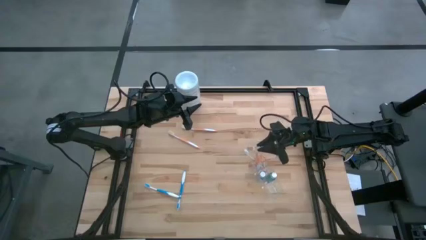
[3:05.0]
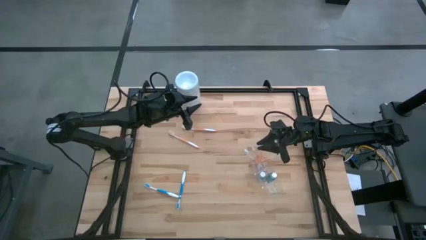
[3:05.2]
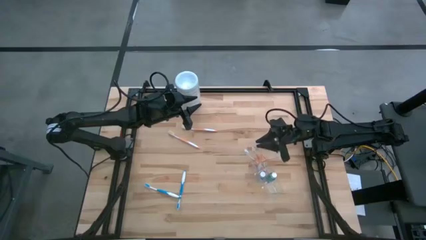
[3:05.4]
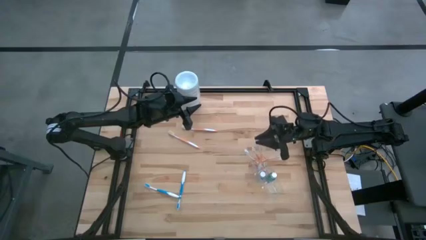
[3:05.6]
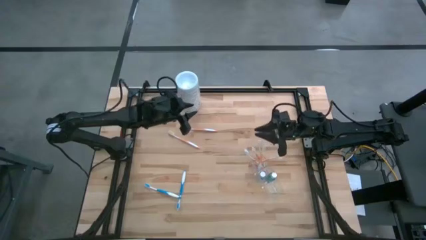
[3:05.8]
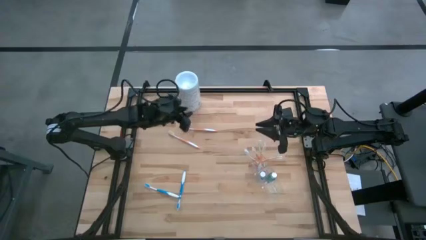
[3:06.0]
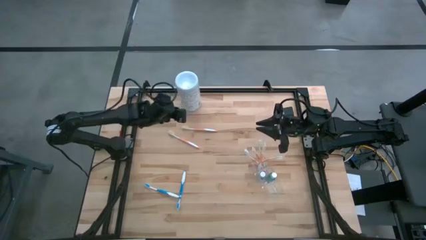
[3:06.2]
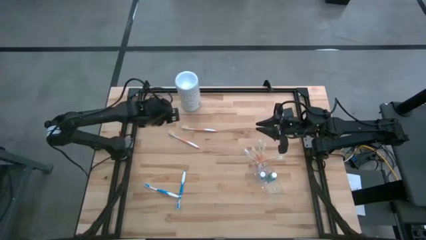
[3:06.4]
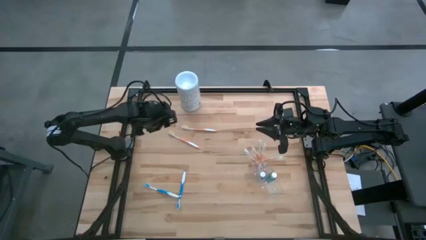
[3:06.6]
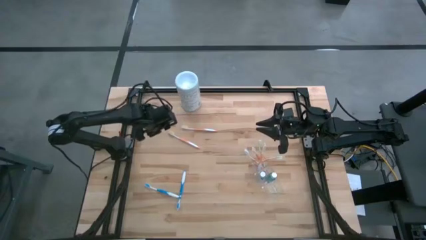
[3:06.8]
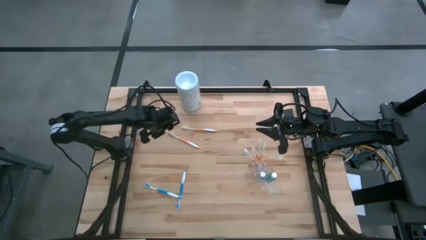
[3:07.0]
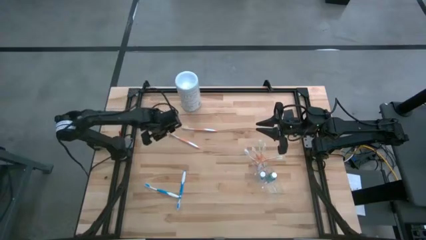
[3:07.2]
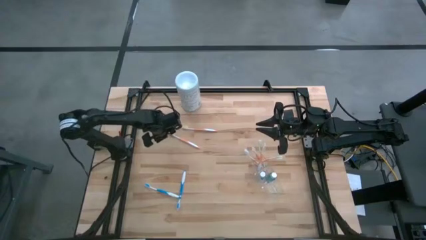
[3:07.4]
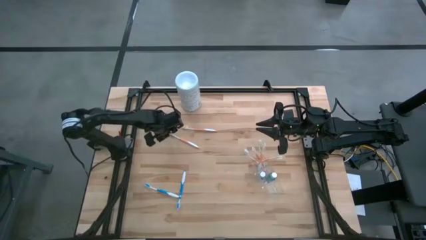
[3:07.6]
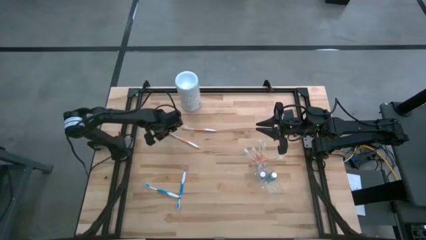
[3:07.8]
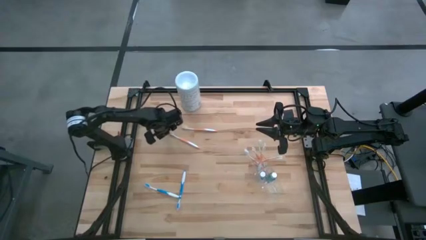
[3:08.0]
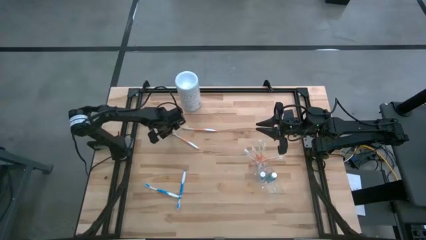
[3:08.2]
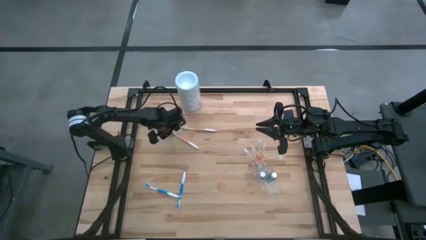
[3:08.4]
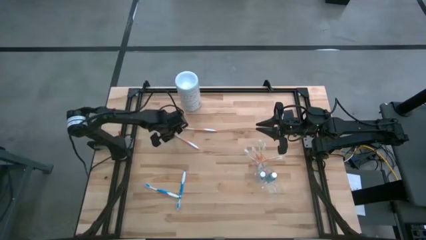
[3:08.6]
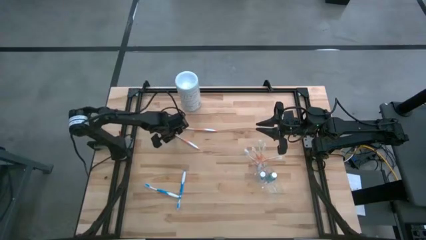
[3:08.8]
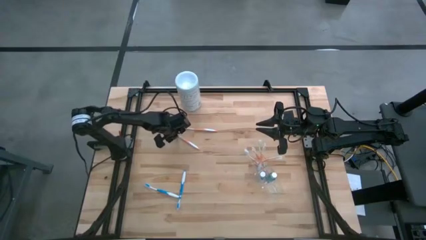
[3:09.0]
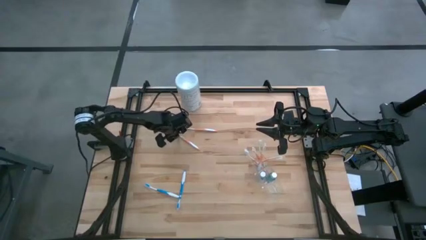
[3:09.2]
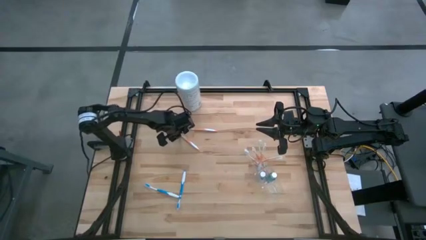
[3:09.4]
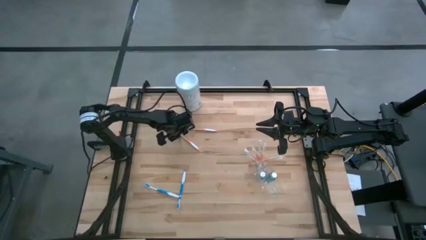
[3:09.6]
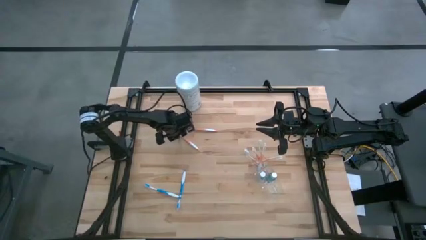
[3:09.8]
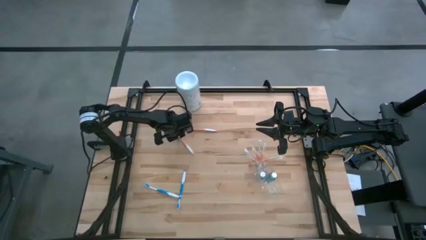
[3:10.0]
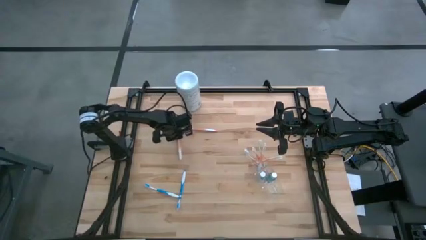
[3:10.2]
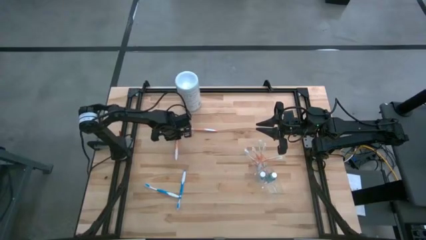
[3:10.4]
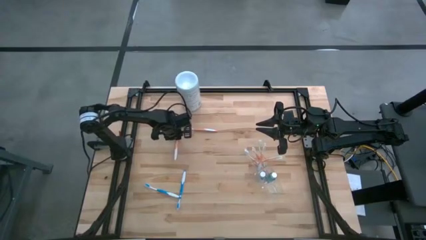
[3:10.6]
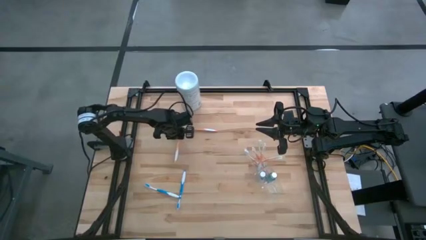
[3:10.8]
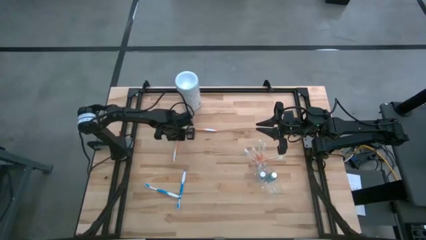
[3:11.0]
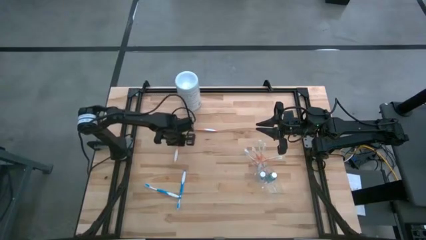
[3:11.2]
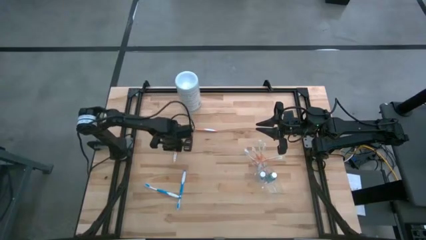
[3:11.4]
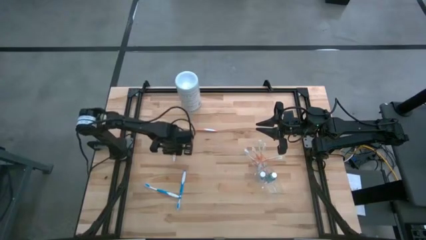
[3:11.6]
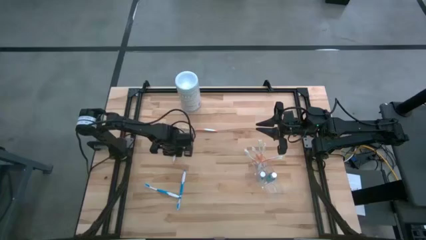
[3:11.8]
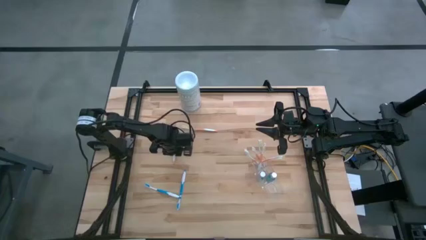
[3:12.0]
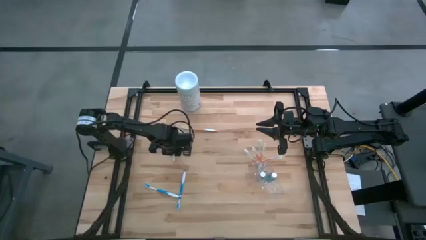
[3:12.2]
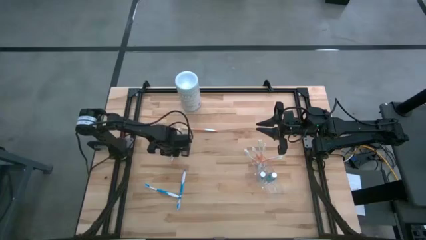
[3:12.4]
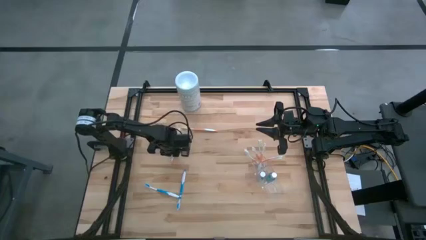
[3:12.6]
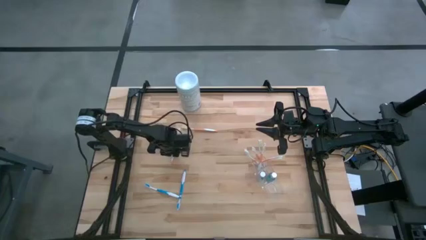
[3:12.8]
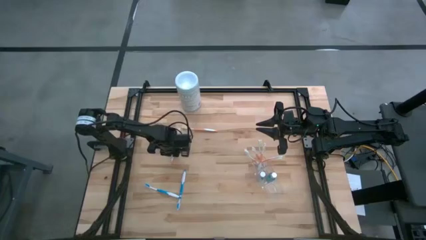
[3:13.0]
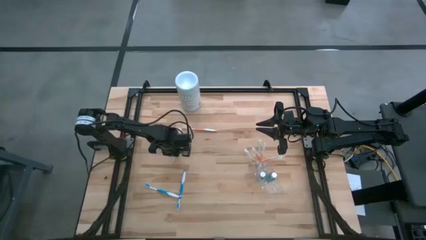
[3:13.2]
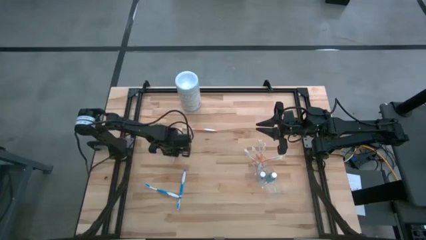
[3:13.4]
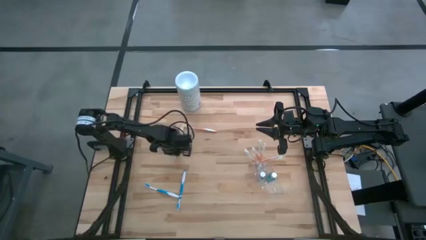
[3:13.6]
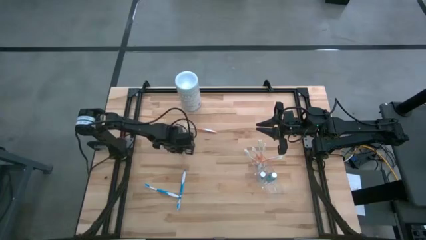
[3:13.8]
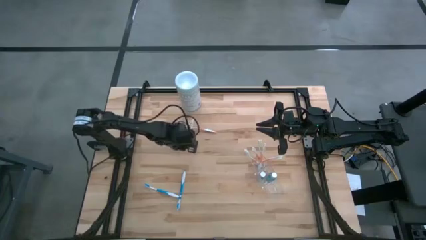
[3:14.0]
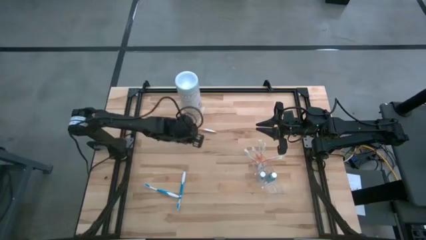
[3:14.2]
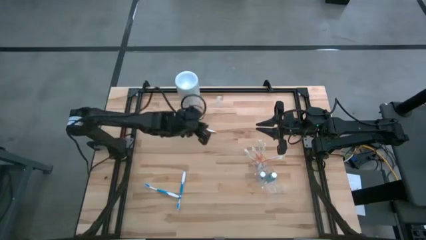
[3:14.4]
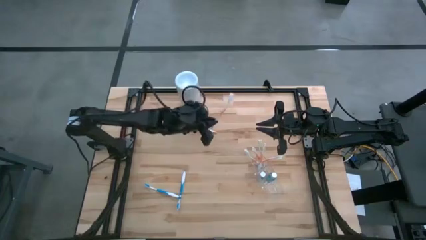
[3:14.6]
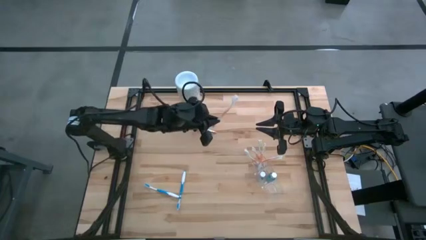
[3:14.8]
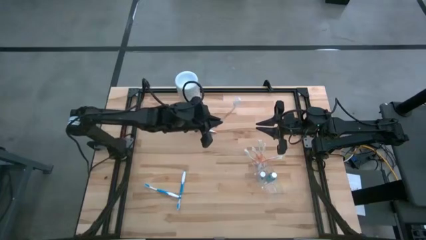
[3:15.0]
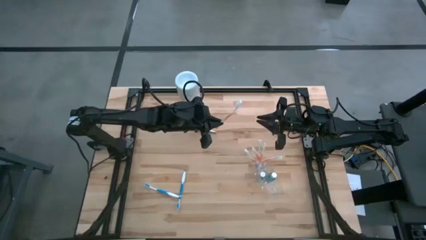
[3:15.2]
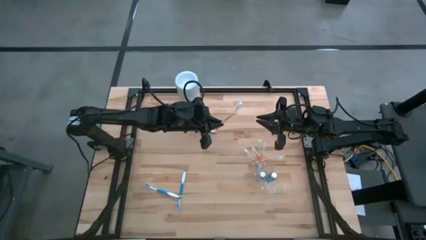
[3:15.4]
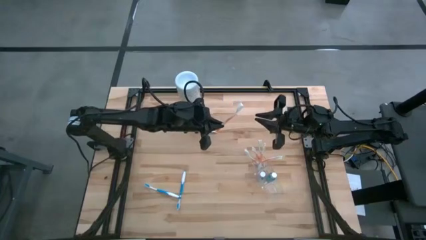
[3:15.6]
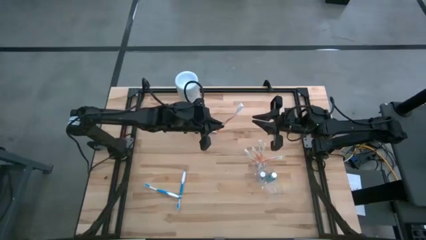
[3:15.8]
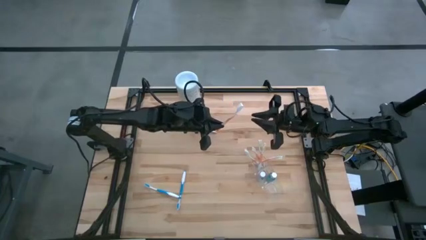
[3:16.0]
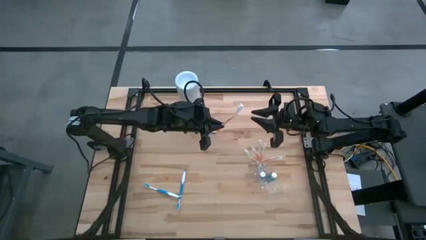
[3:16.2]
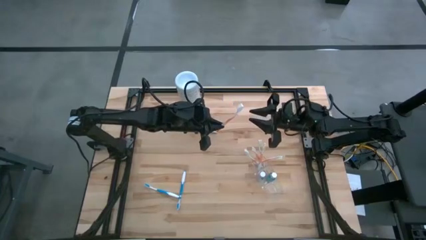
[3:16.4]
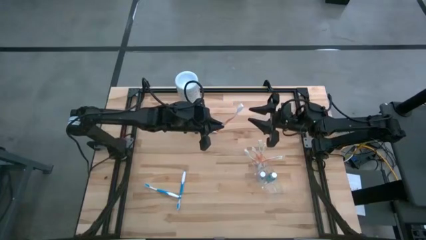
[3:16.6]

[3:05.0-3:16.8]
Task: Pick & Place toothbrushing station
Put the orange toothbrush into the top section of the transparent organizer

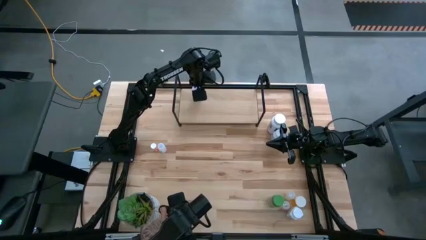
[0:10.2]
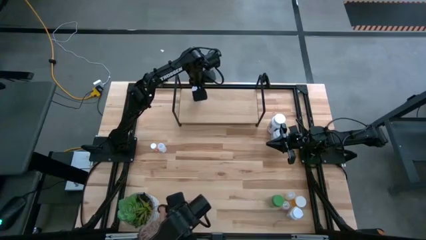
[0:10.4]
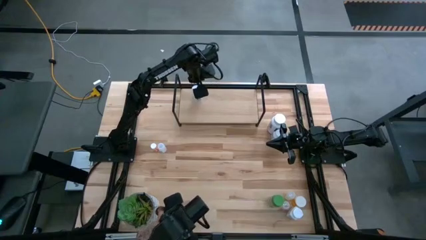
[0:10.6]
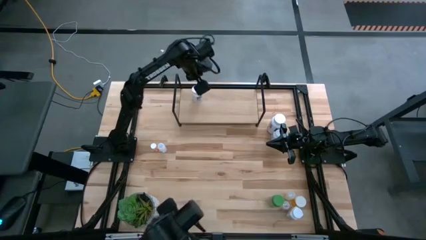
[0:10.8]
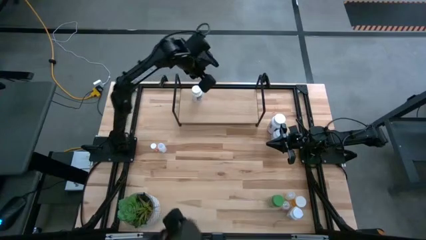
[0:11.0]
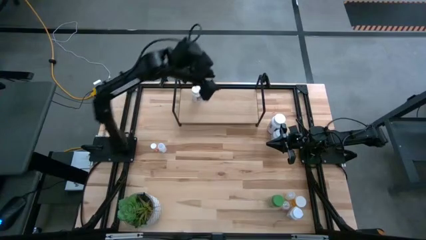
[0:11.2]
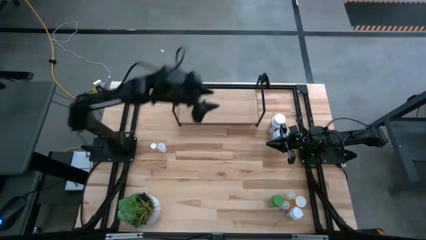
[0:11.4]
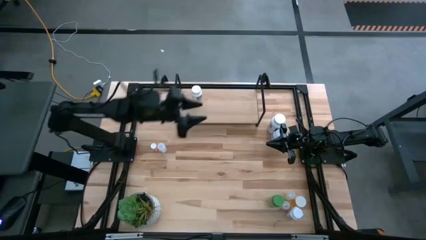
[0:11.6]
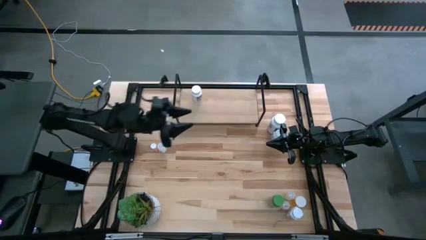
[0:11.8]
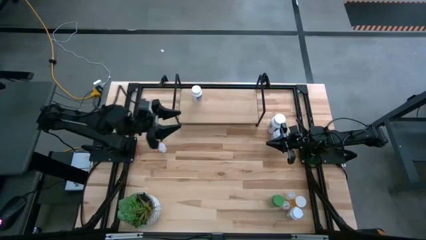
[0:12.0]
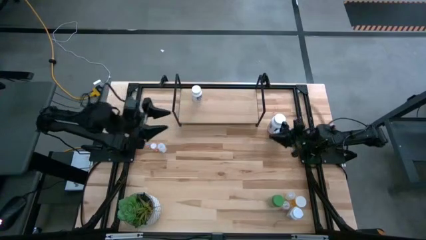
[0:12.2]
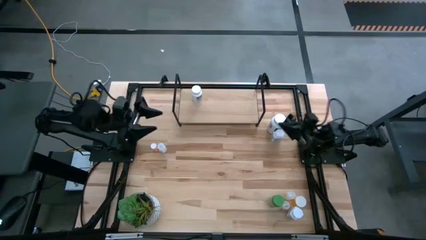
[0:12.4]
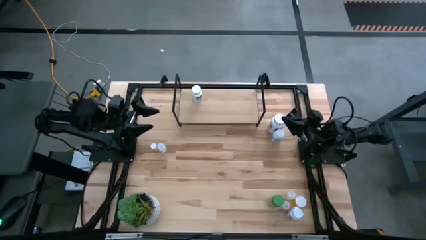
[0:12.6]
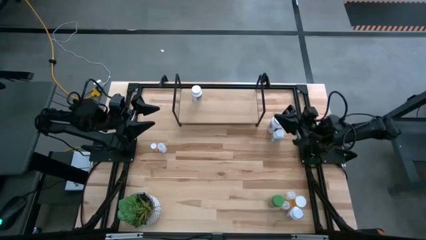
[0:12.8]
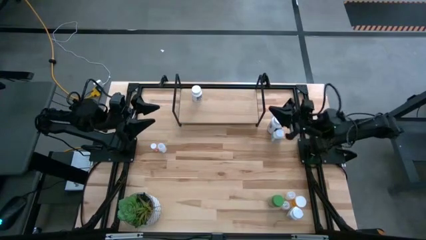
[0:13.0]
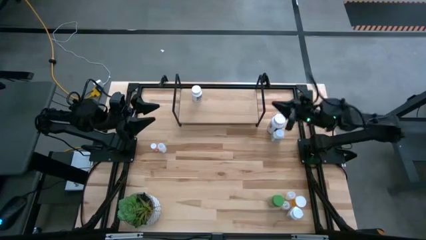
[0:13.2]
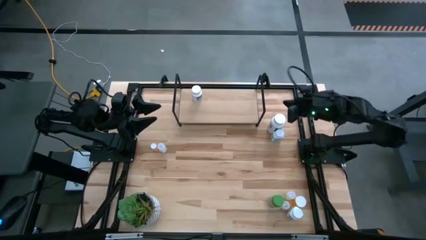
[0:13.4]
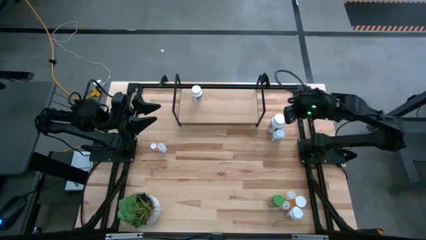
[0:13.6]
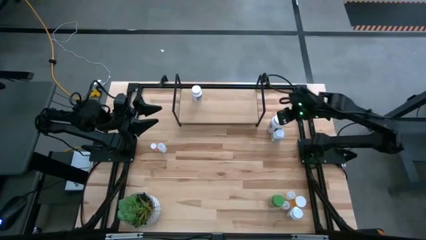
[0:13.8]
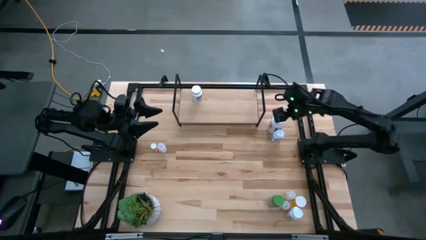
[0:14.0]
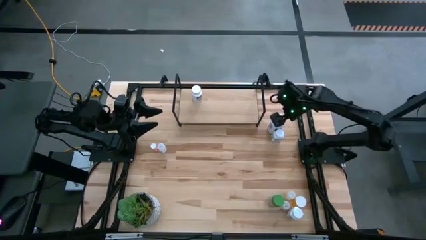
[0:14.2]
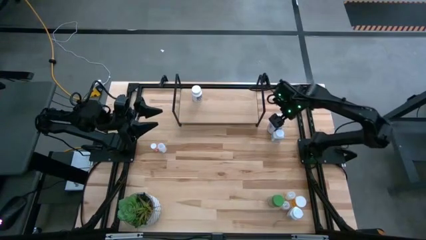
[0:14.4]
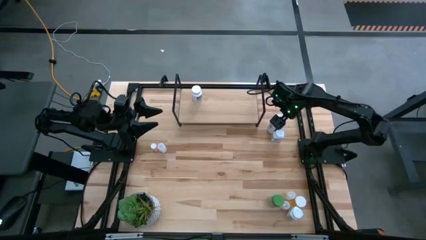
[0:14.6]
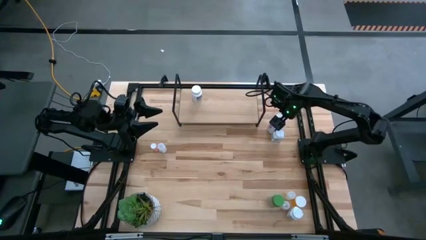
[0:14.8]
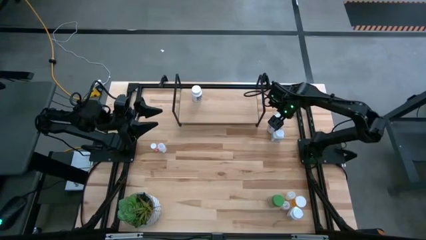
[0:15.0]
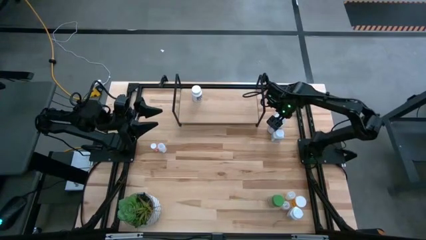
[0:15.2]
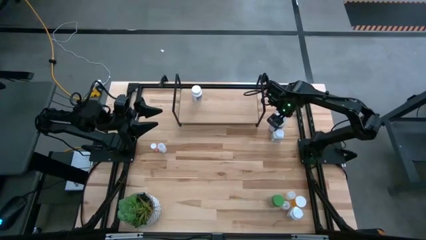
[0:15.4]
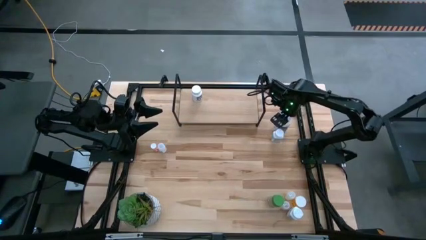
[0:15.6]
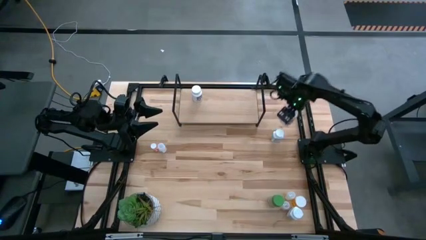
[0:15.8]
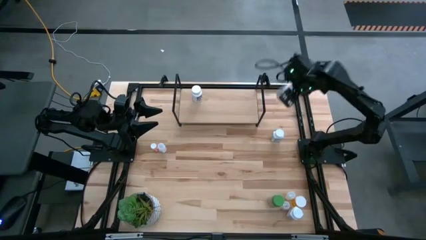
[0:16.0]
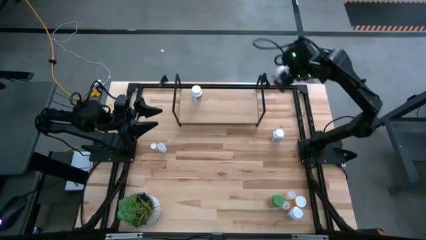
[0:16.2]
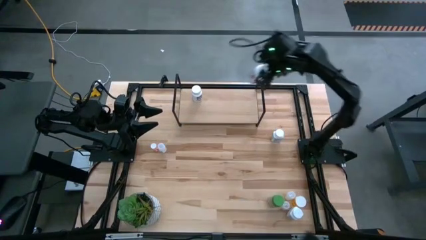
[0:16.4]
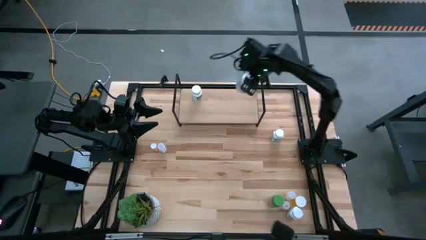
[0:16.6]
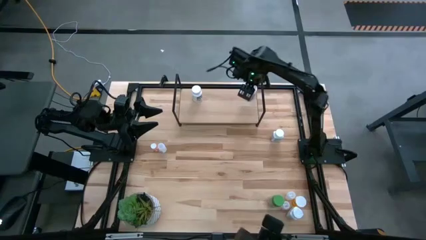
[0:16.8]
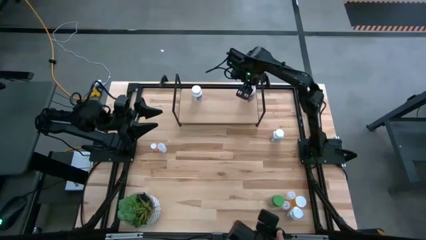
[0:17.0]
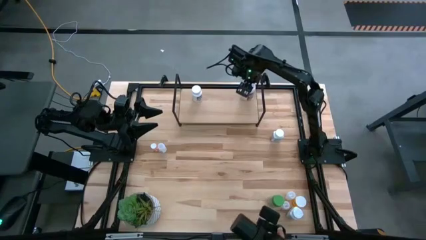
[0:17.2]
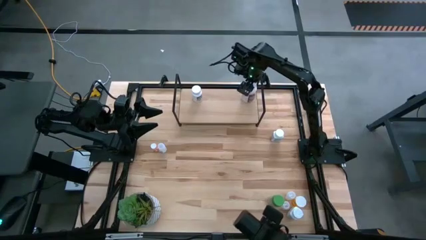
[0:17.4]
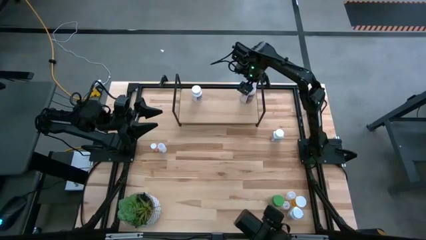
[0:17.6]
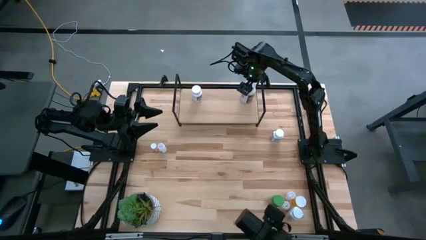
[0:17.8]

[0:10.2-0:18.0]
Task: Pick and place medicine bottles onto shelf by color
Put the white pill bottle on the shelf
